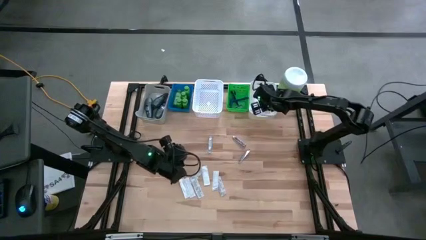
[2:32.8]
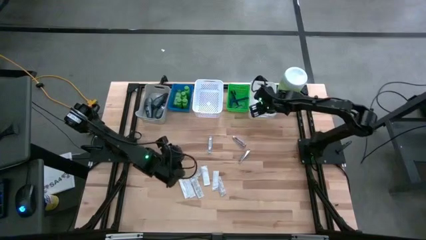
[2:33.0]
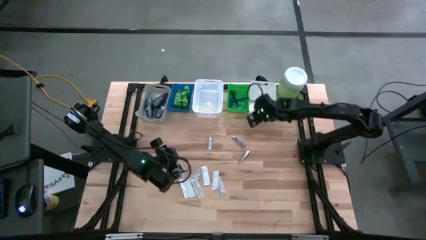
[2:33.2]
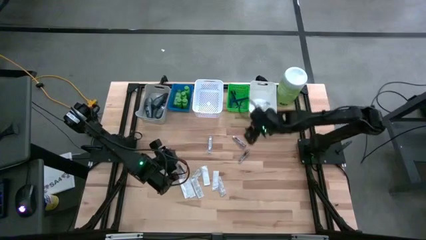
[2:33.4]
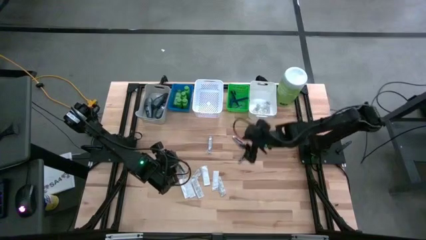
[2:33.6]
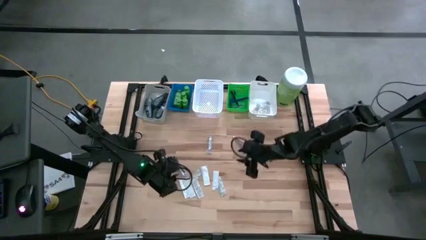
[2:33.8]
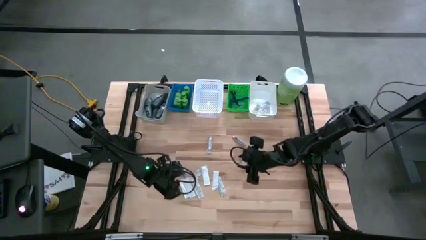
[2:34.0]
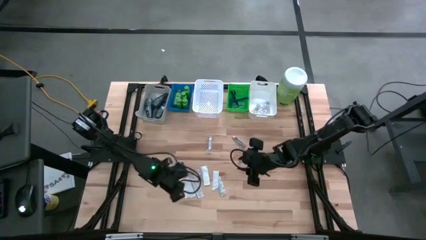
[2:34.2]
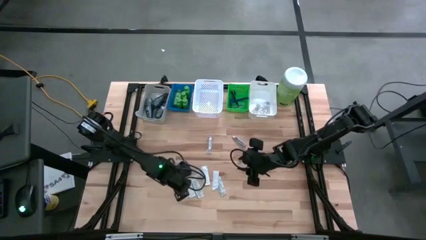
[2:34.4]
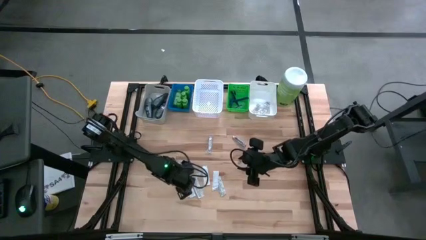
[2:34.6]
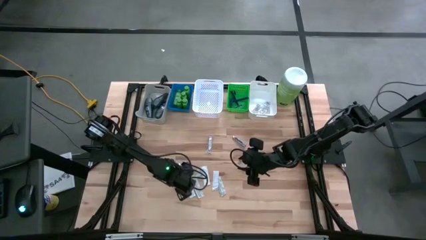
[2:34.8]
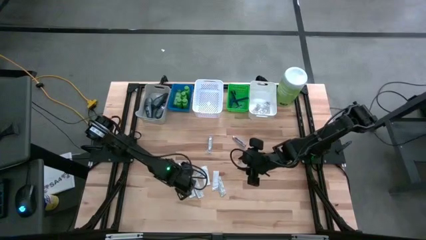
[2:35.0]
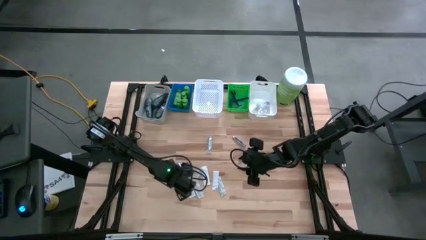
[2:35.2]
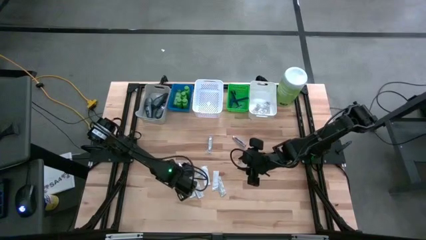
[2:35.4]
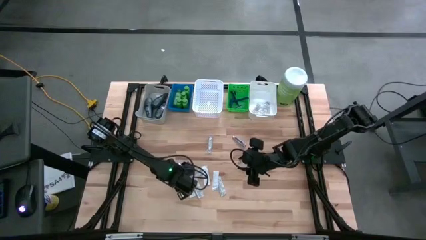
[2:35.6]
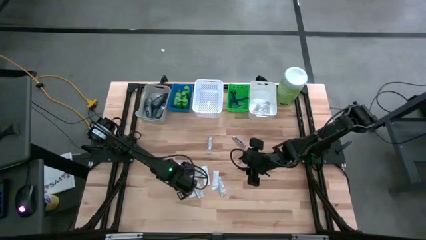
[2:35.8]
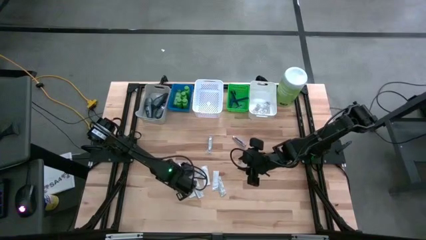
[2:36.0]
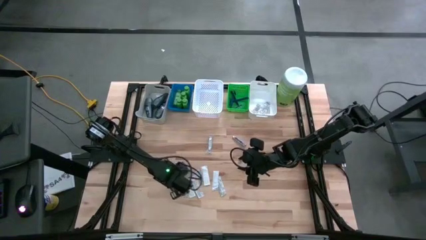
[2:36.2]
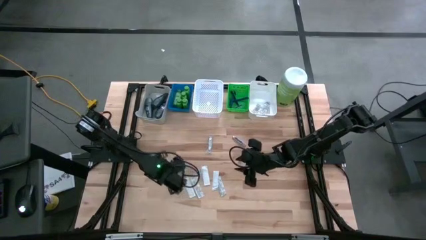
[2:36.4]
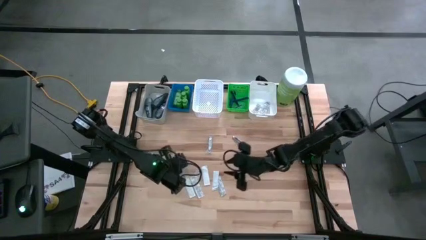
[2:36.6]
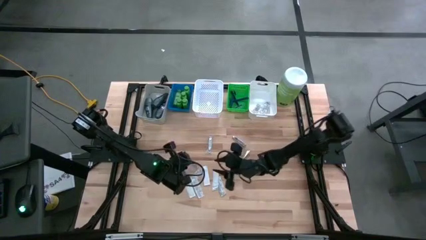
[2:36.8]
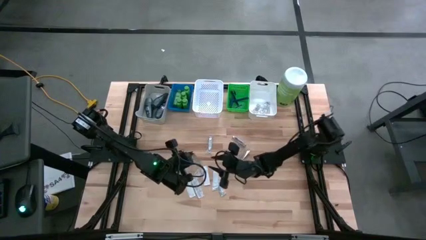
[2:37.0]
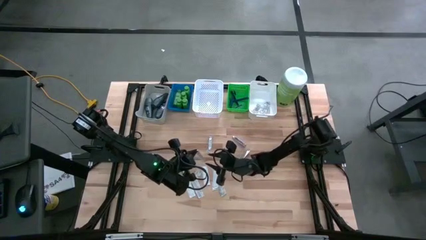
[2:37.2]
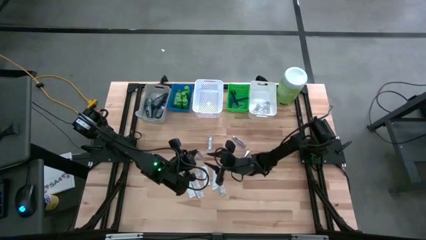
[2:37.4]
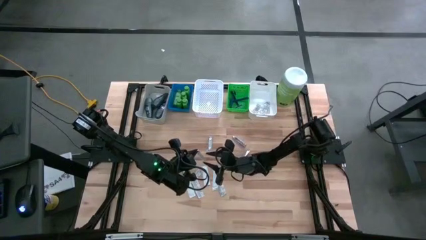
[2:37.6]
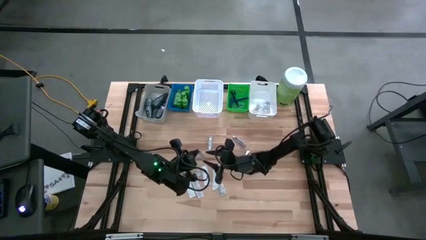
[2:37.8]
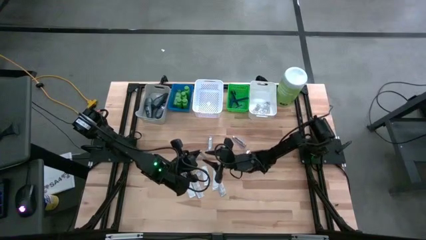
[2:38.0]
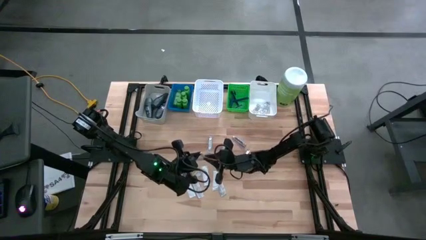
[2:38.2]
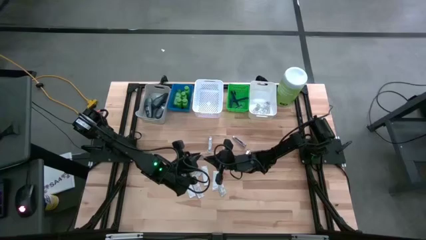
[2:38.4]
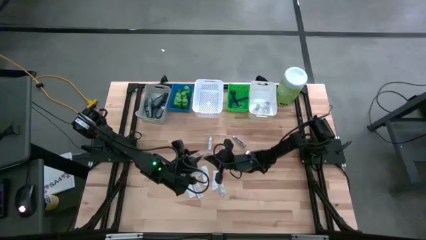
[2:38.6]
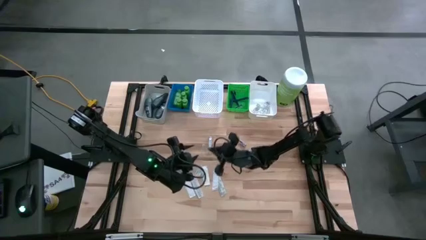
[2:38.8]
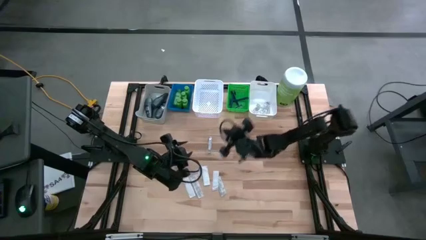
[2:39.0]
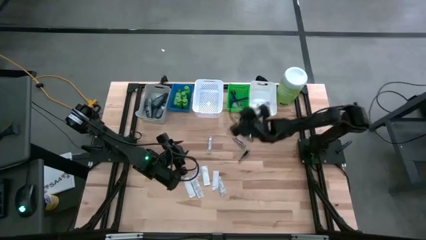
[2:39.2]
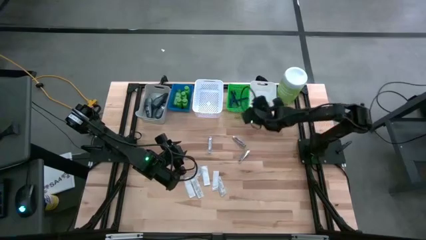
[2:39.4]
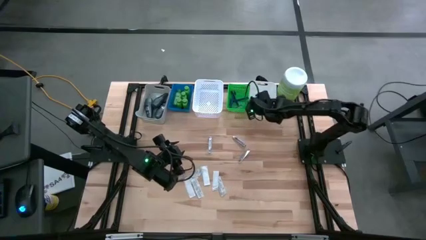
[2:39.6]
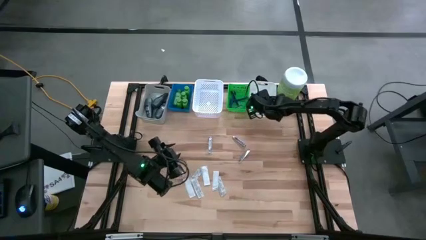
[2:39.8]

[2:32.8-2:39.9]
Task: Pick & Place Travel size toiletries
Put the bandage into the right white bin

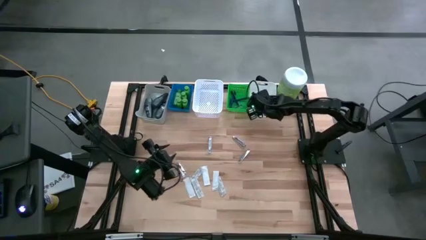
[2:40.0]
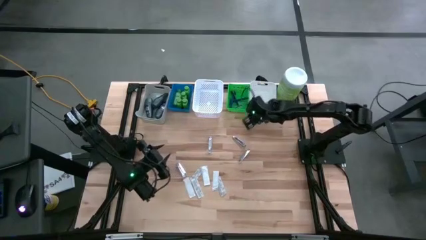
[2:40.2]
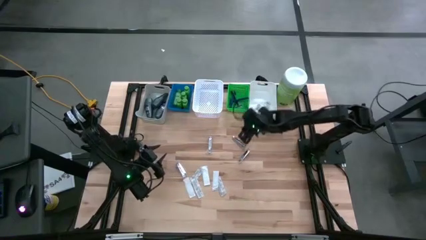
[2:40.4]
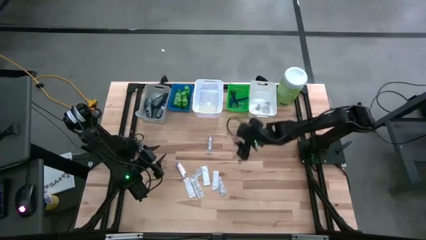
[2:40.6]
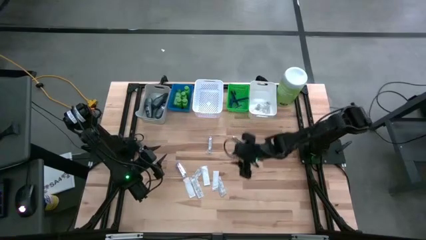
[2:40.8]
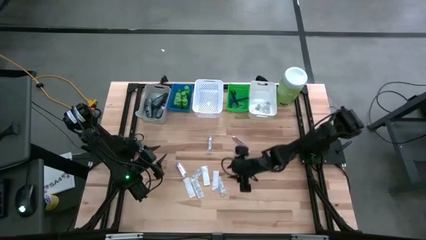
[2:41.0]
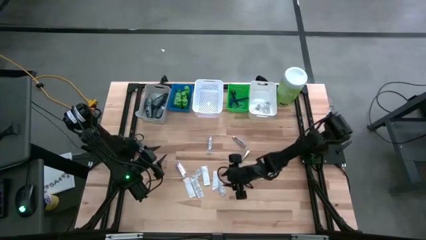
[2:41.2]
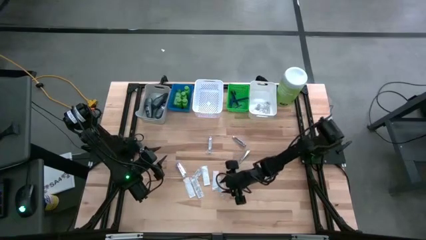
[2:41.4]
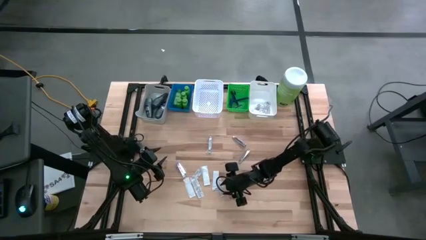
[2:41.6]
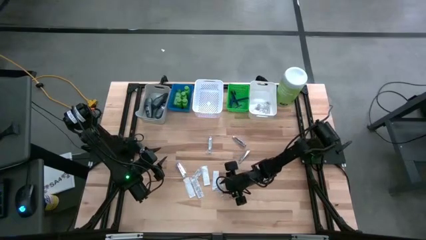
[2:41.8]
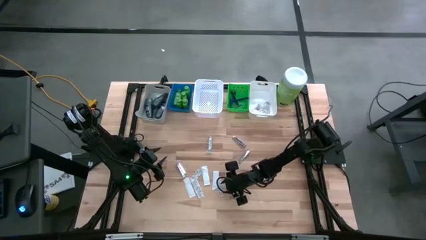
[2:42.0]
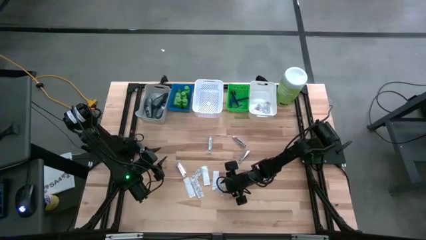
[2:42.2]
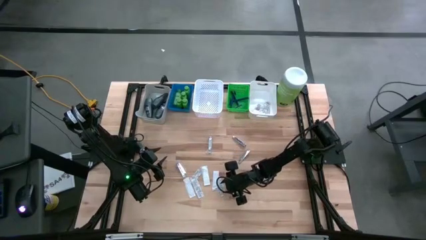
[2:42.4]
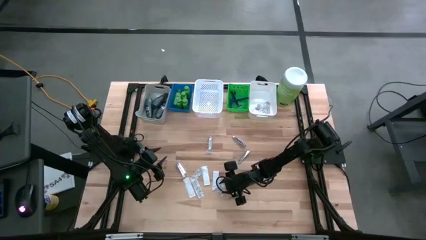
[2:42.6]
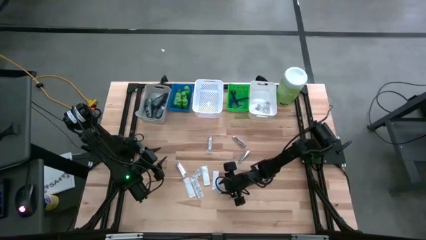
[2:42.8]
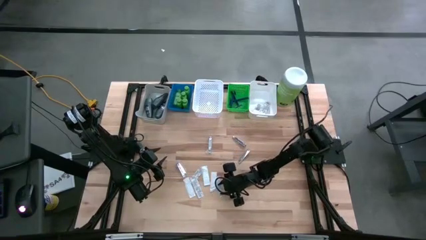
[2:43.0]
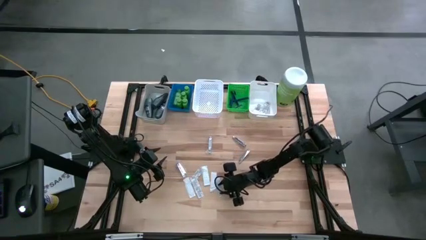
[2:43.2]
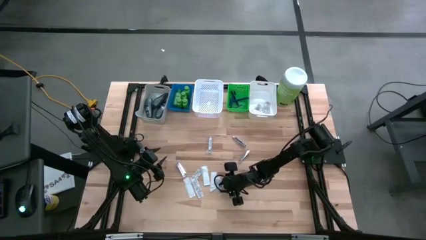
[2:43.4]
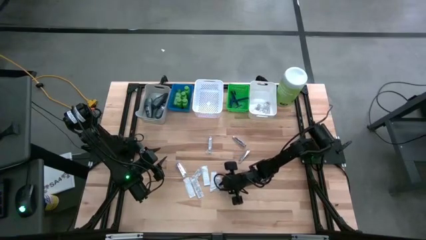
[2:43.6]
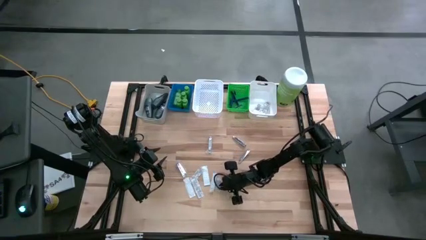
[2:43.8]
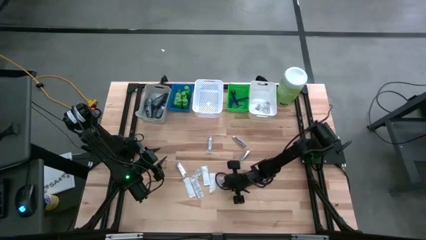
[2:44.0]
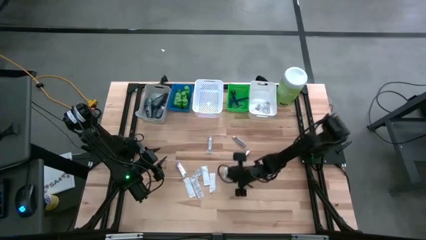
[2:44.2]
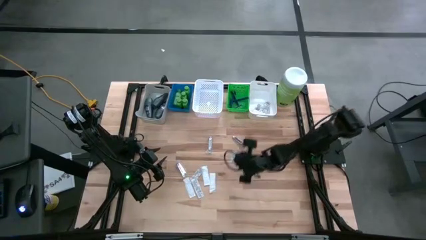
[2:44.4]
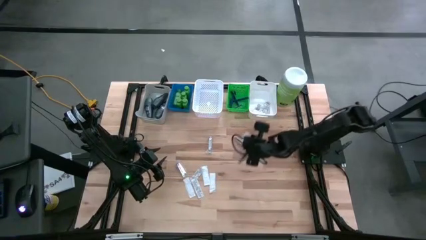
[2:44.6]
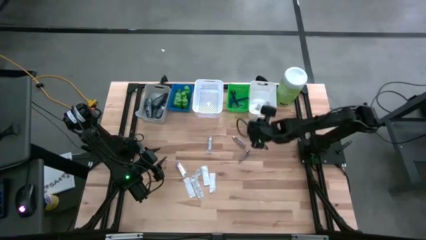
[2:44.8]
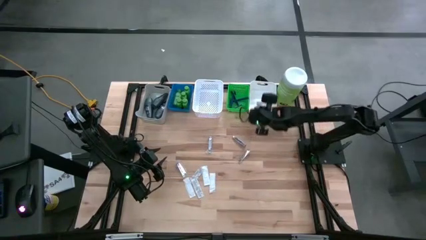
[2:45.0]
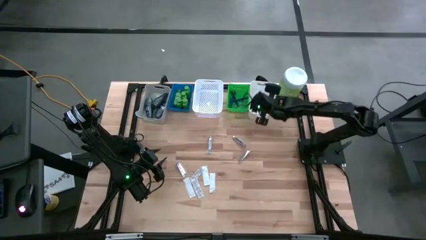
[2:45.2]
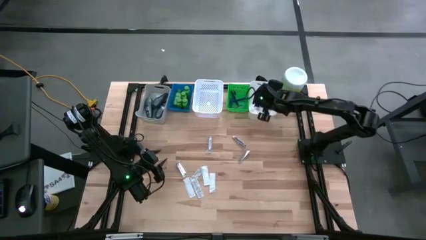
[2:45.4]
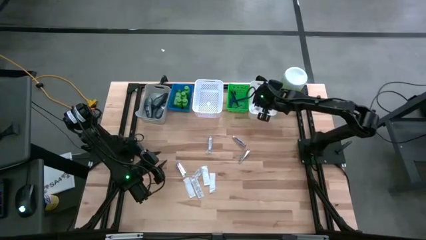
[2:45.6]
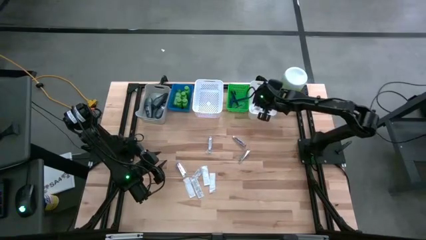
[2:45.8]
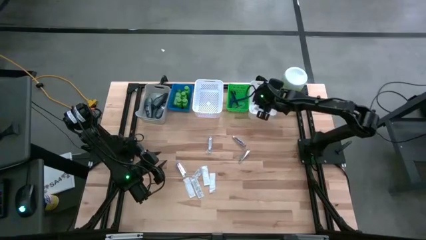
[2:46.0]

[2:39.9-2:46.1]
Put the bandage into the right white bin

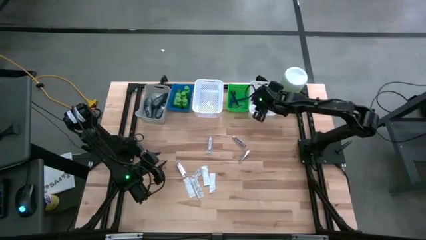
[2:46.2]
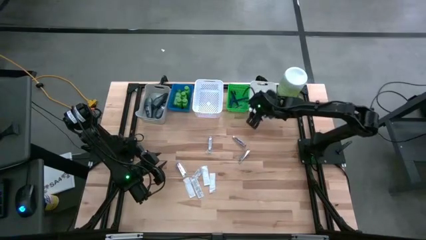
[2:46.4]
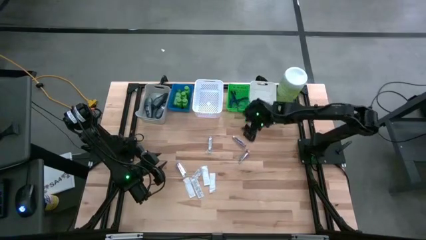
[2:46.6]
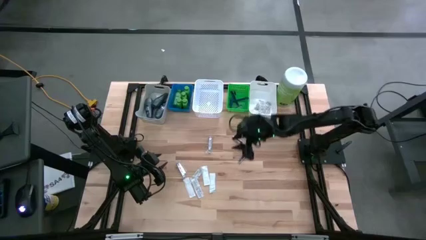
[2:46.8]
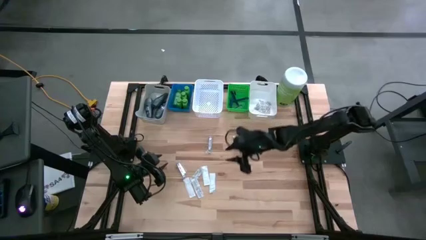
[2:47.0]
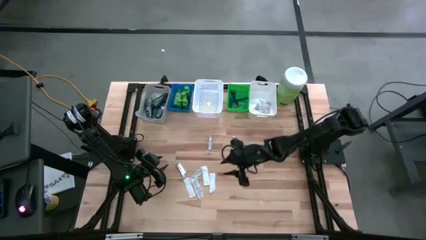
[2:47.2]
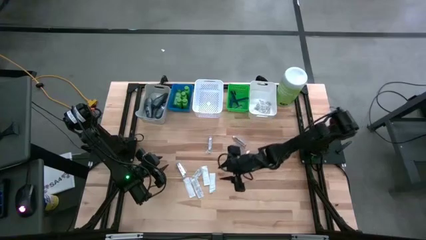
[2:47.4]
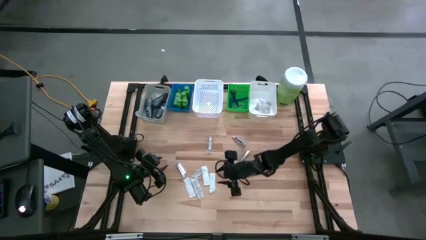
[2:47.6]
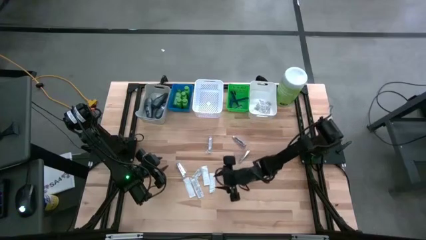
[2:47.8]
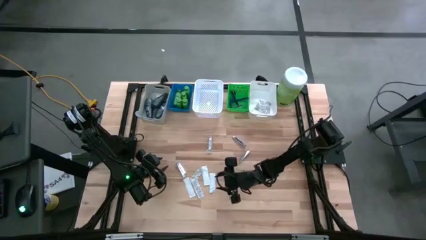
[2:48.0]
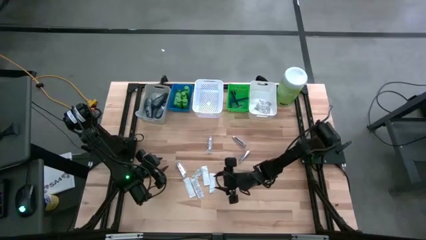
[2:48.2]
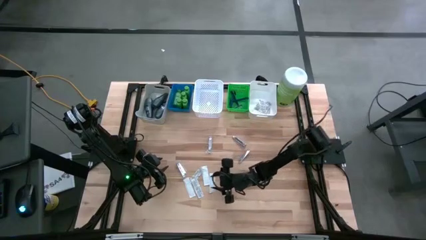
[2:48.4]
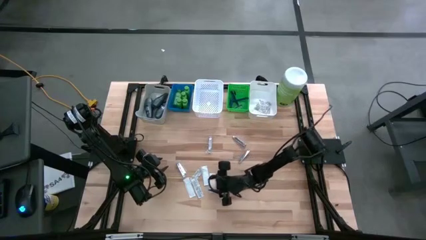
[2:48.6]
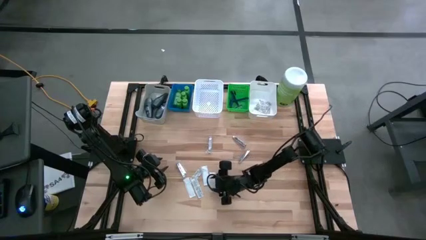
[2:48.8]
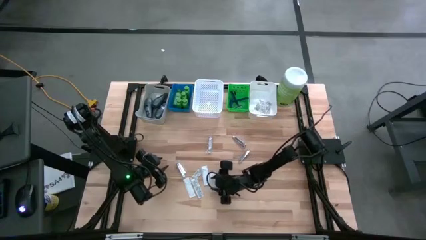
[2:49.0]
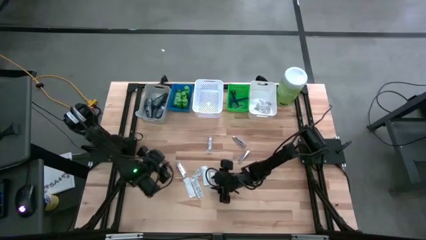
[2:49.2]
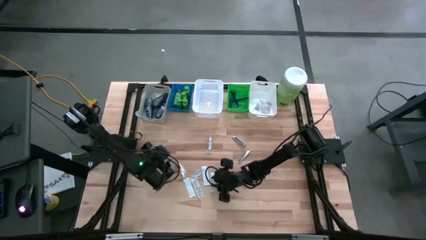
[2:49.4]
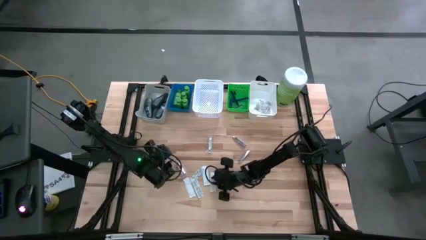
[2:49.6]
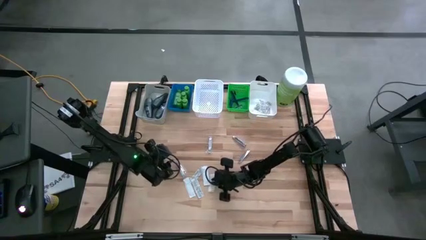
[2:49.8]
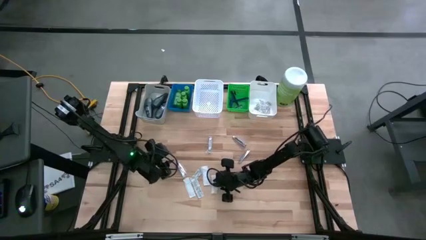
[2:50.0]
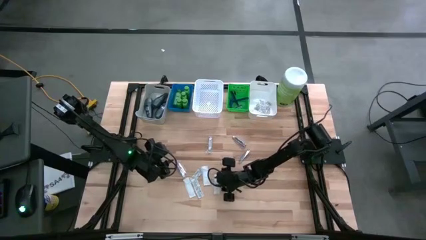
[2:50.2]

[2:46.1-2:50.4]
Put the bandage into the right white bin
